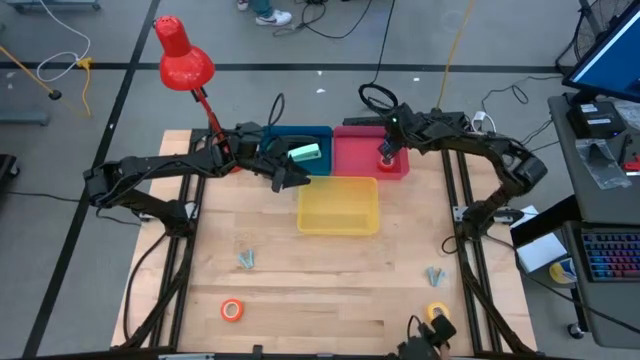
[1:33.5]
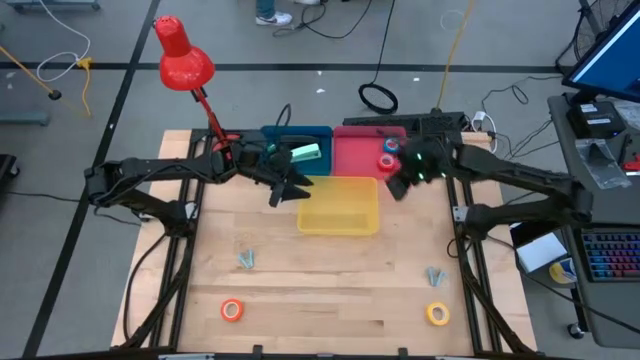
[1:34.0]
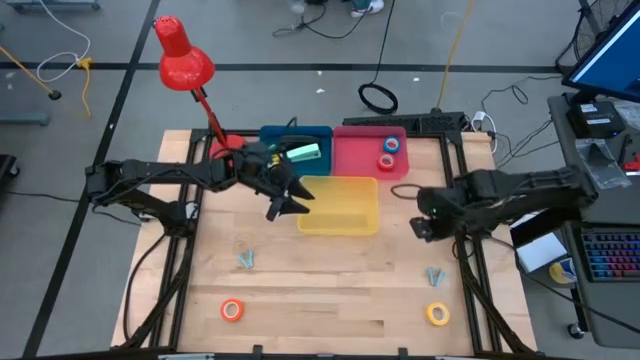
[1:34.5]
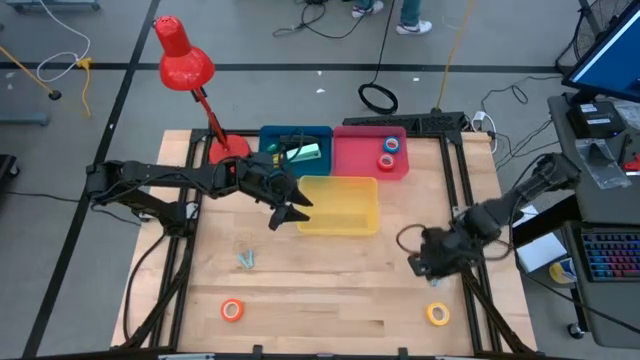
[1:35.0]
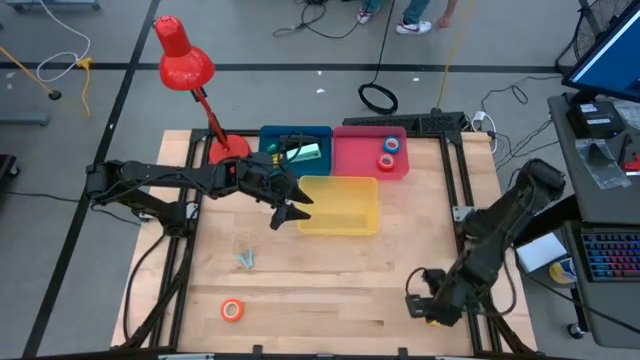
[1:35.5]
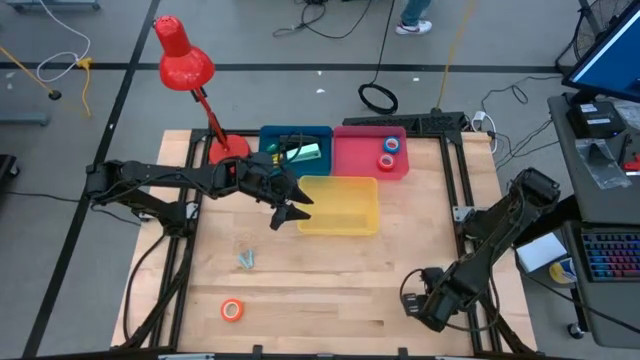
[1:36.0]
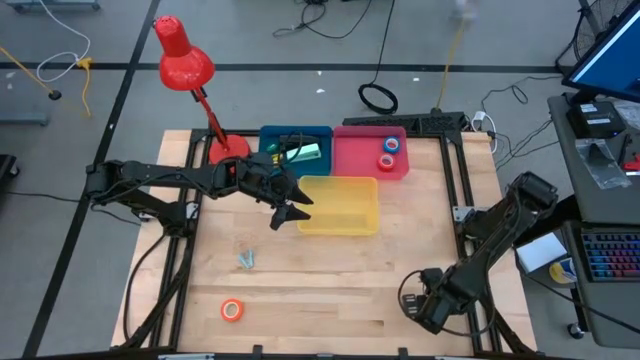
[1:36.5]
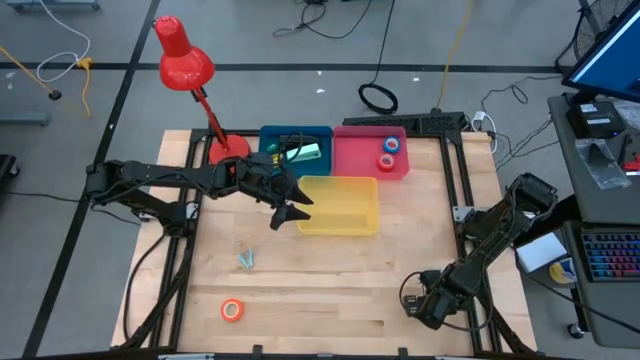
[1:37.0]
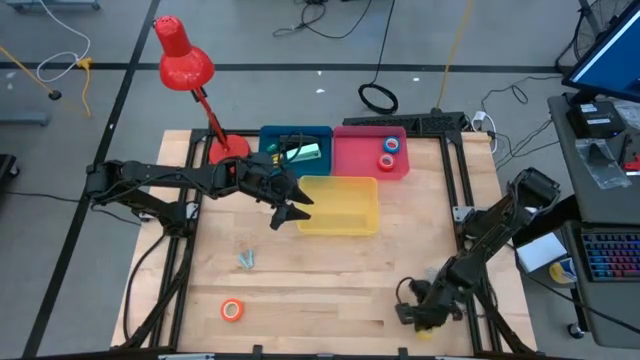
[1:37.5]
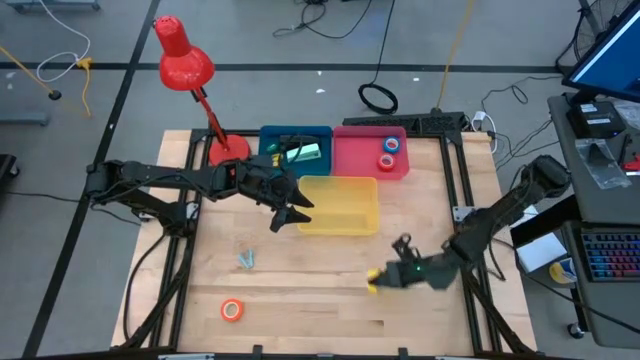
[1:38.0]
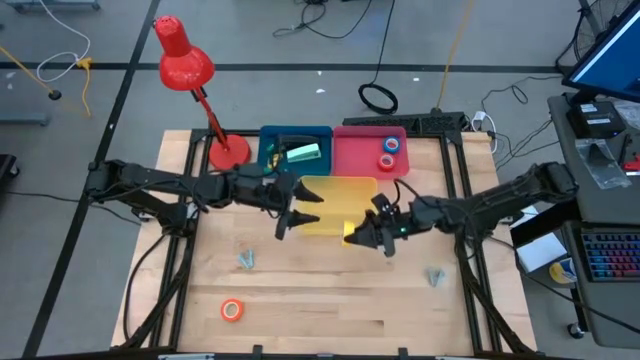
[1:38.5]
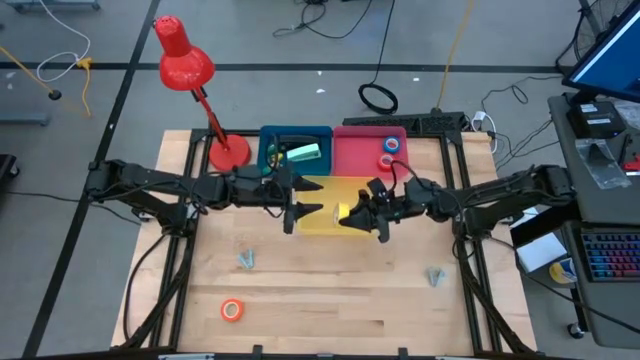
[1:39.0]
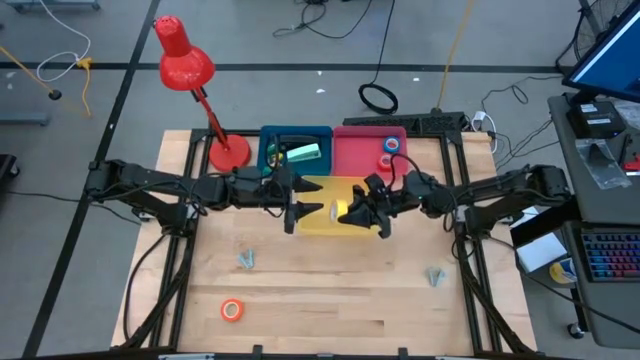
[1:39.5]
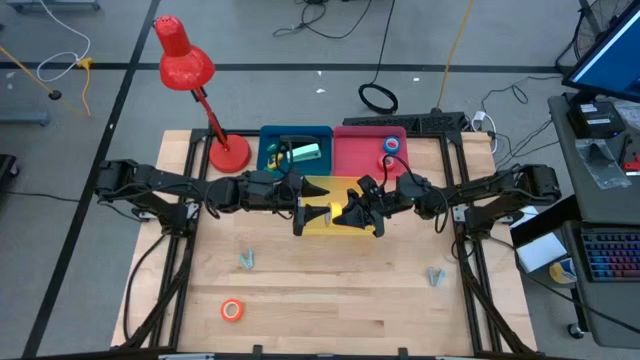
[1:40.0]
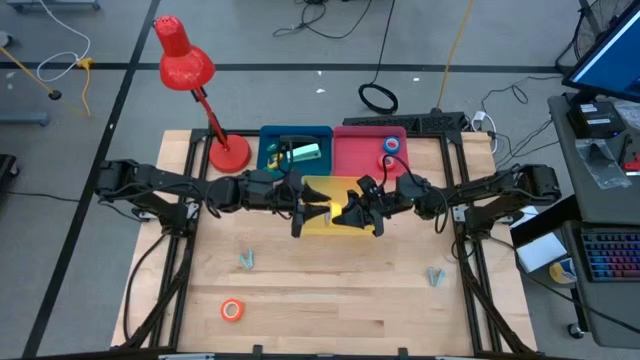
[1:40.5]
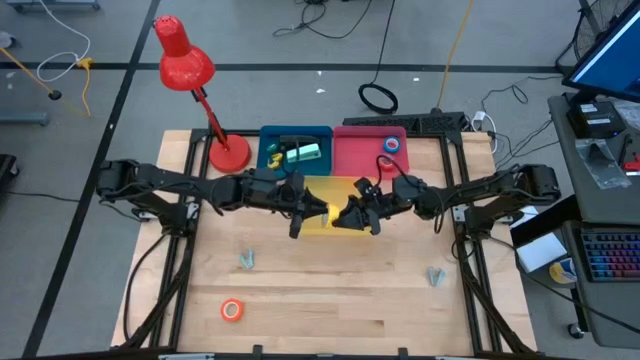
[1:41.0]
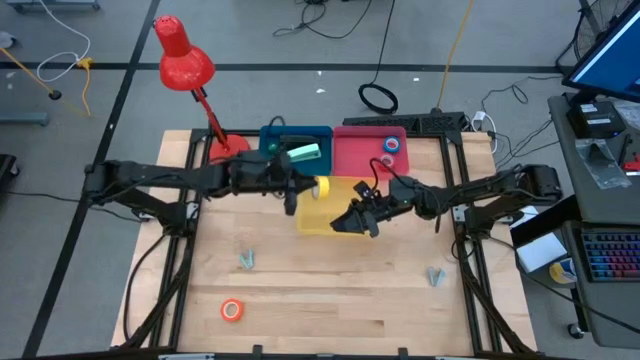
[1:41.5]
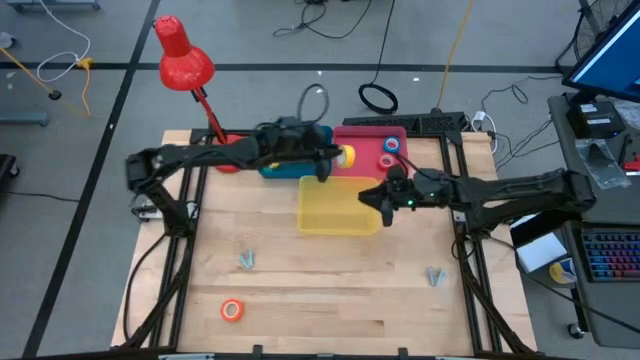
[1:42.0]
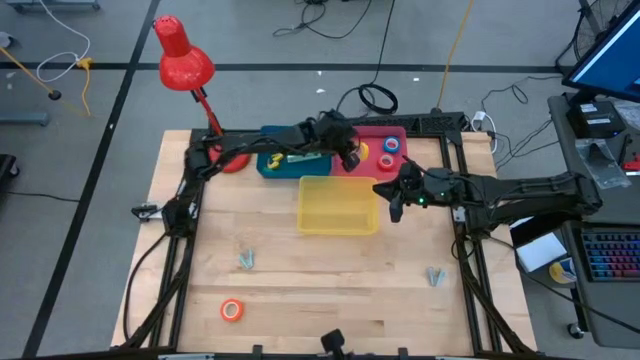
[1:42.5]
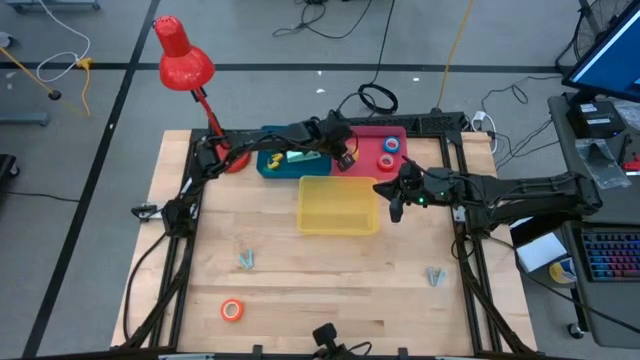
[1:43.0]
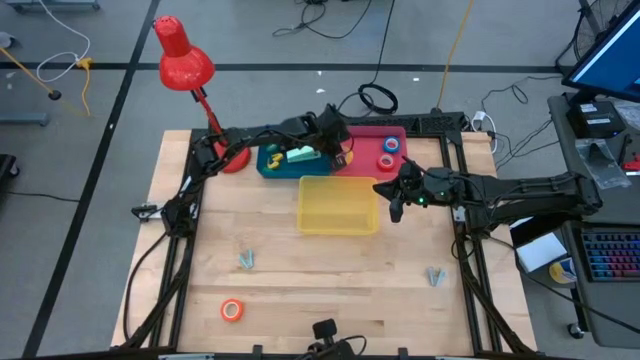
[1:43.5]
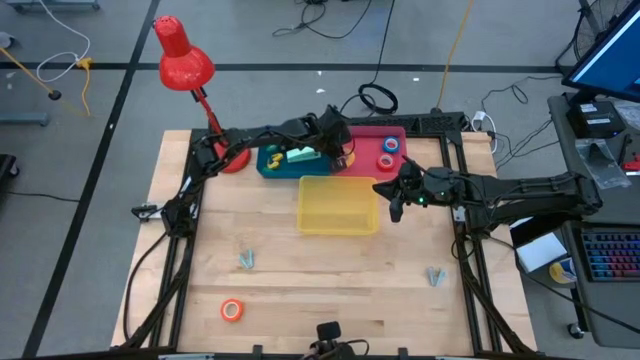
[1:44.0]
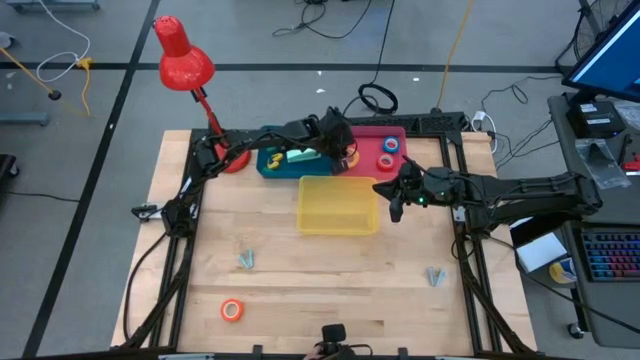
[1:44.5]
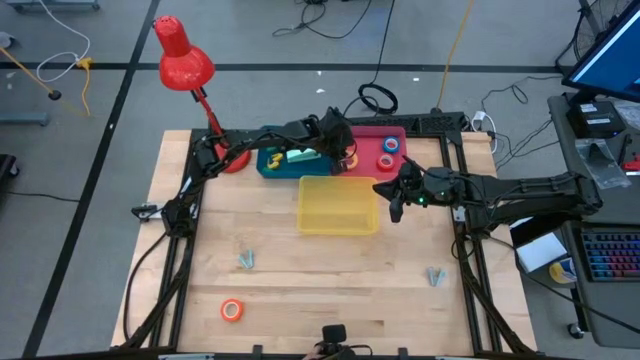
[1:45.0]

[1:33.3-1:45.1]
Task: Pick and place Stapler, Stapler remover, tape
Put the yellow tape into the pink bin

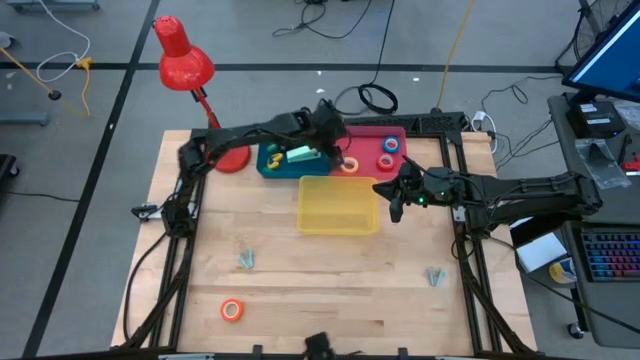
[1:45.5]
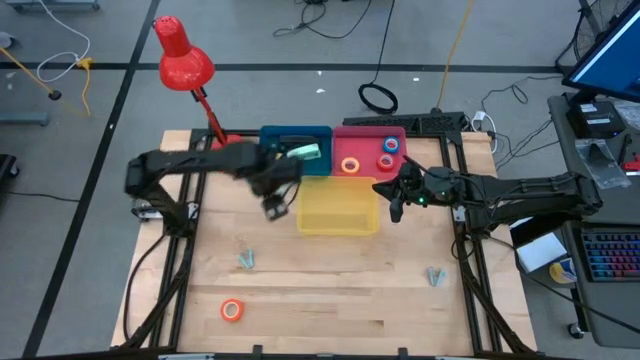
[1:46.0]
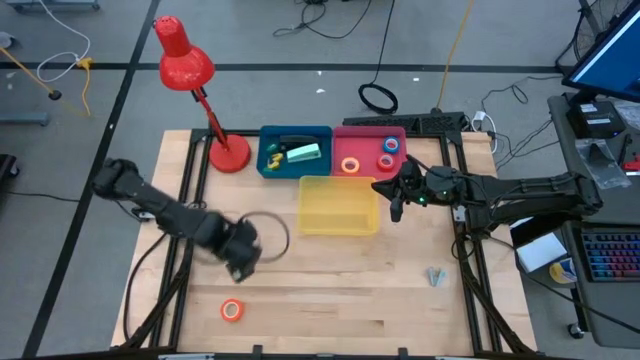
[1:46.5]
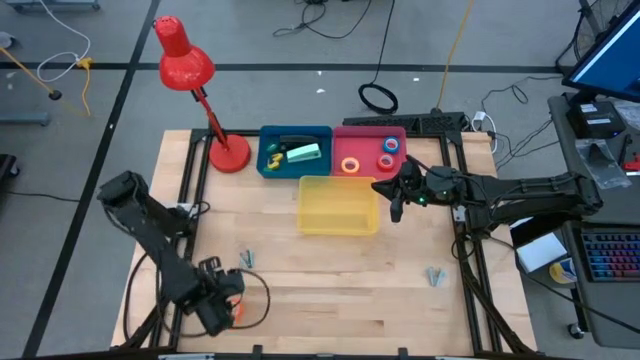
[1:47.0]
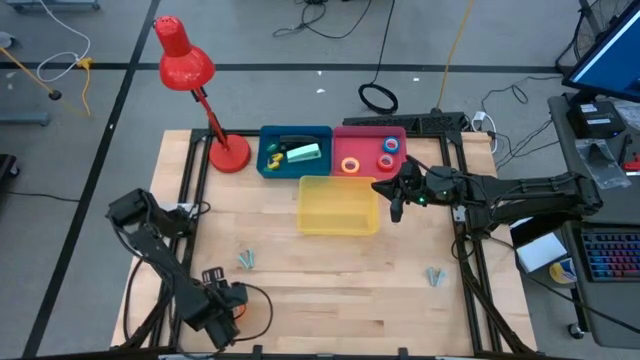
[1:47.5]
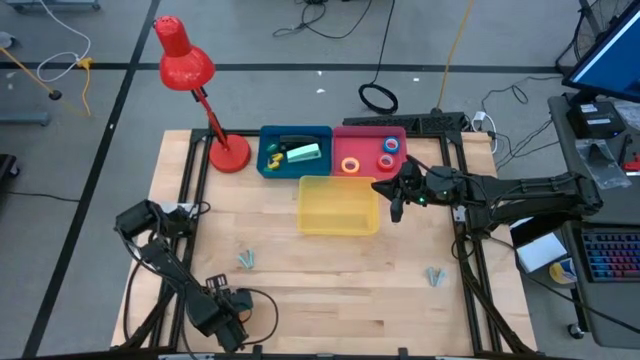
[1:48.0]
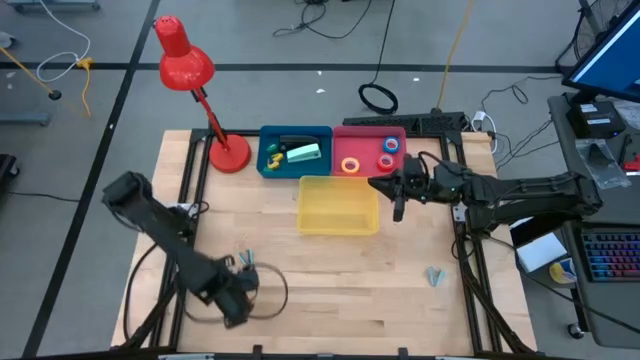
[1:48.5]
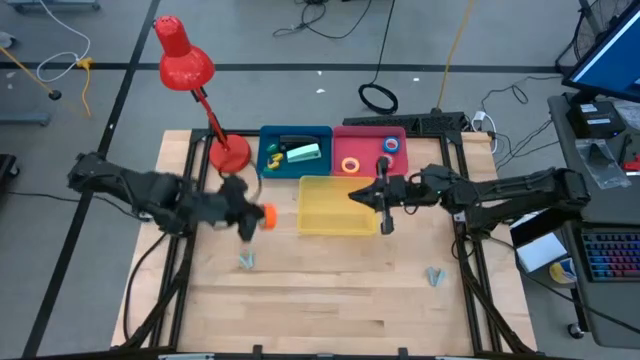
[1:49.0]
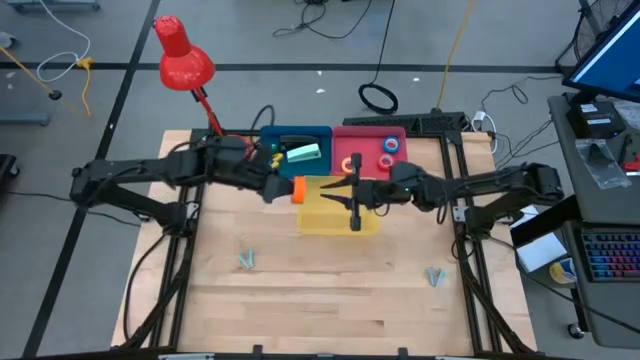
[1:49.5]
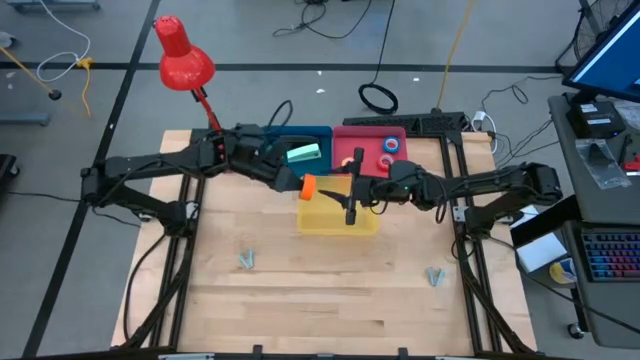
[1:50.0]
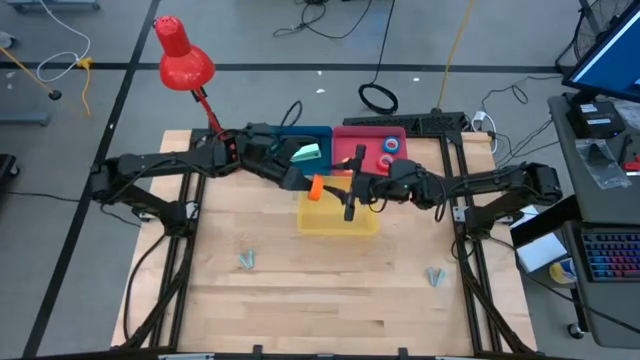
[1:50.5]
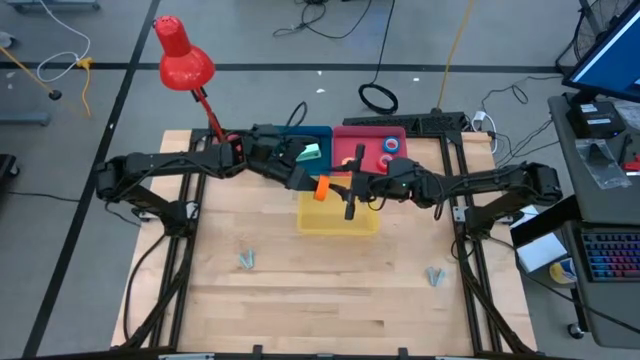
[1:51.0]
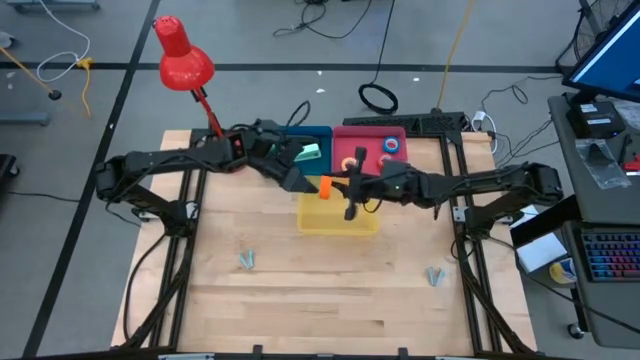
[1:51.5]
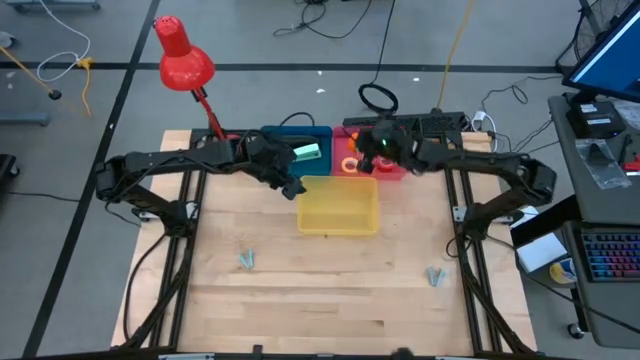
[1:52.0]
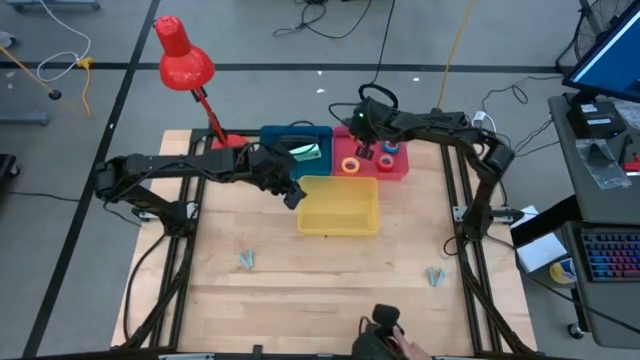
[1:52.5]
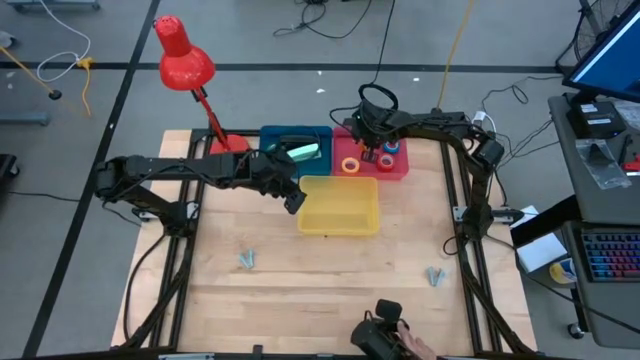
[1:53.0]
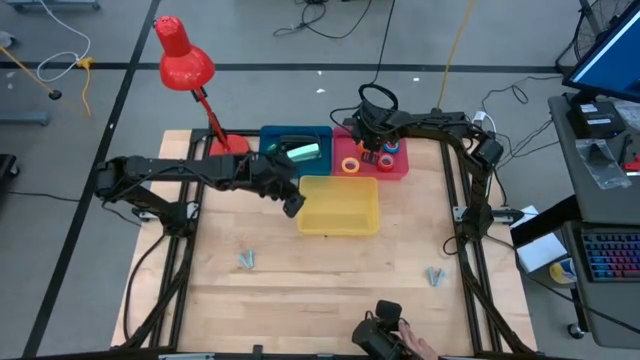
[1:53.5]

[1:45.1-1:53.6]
Put the orange tape into the pink bin

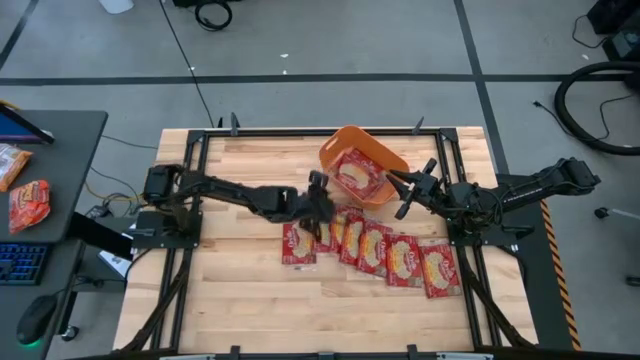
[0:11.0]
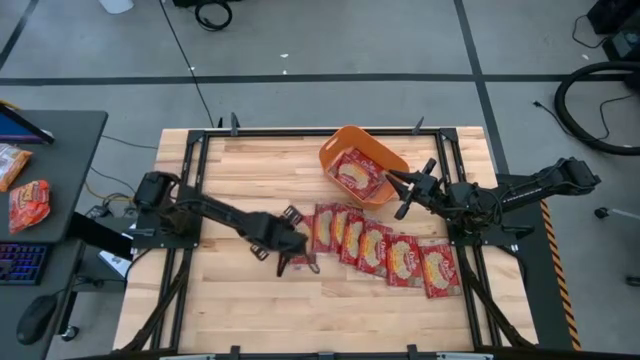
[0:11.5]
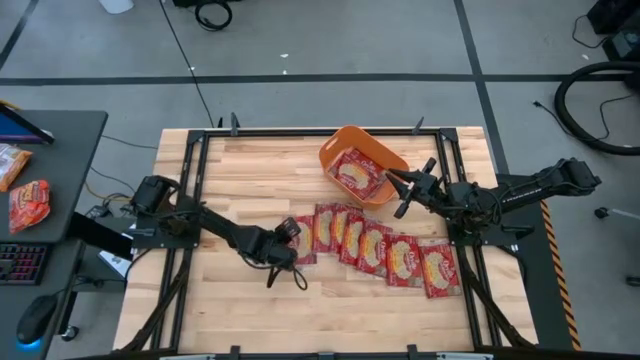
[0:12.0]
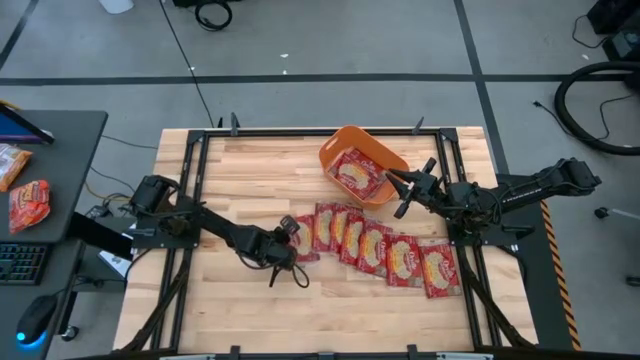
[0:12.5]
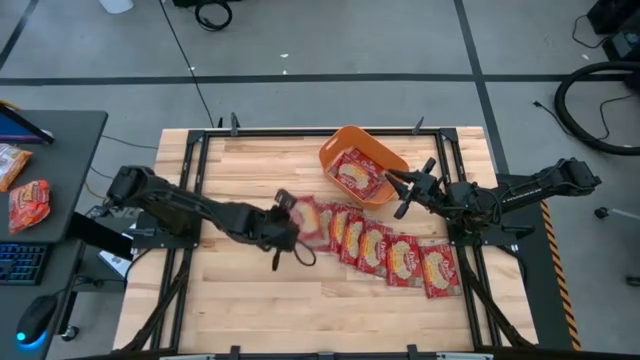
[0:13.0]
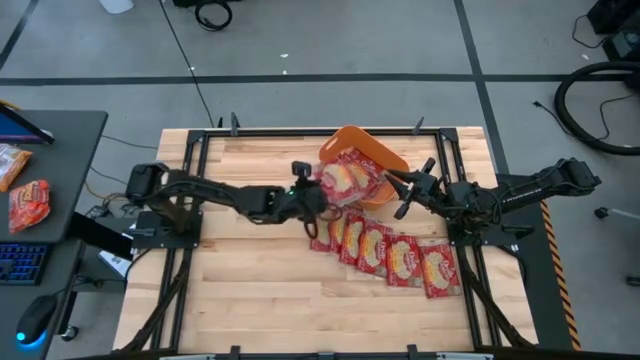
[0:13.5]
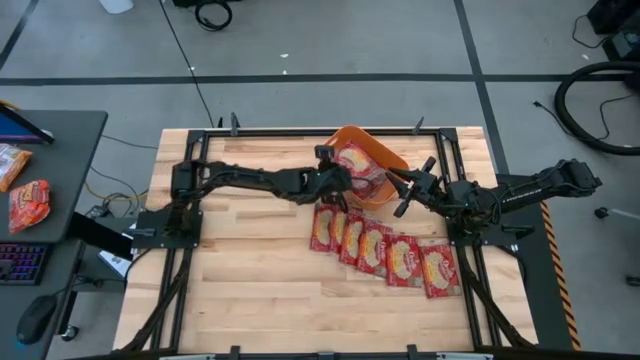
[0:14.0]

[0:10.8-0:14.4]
Task: Sort popcorn bags into baskets
Put the popcorn bag into the bin
